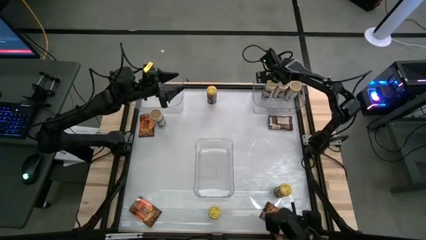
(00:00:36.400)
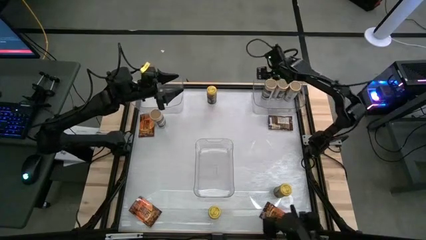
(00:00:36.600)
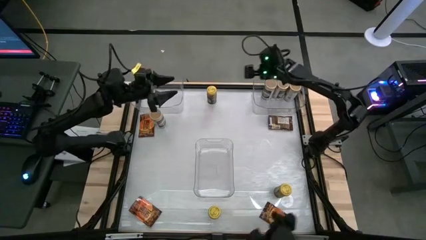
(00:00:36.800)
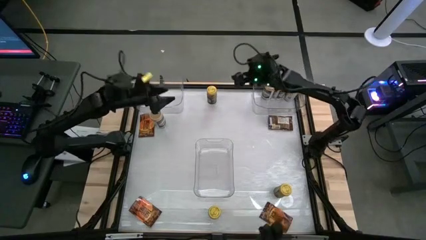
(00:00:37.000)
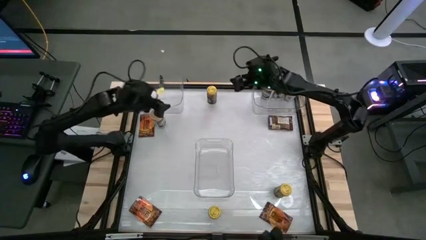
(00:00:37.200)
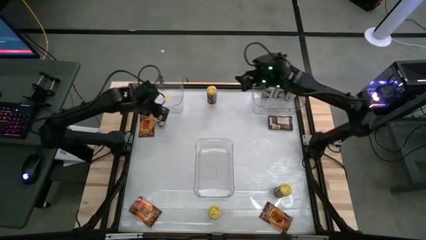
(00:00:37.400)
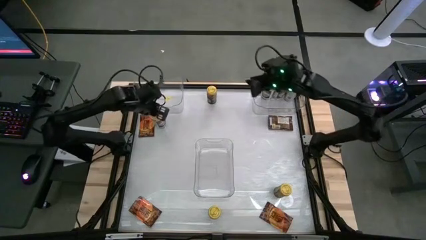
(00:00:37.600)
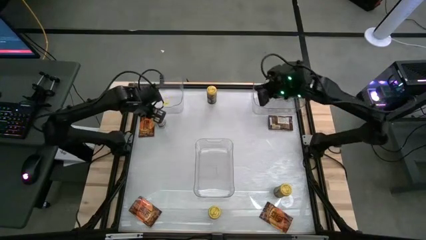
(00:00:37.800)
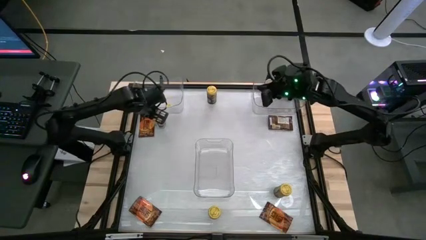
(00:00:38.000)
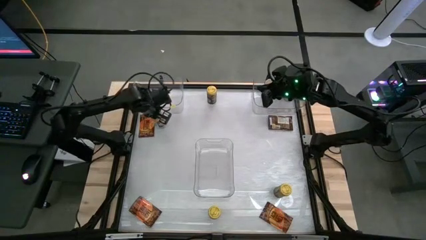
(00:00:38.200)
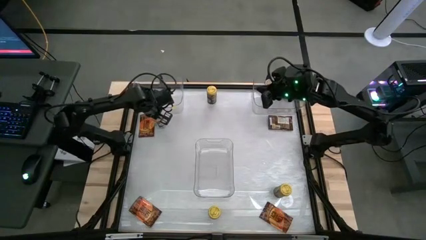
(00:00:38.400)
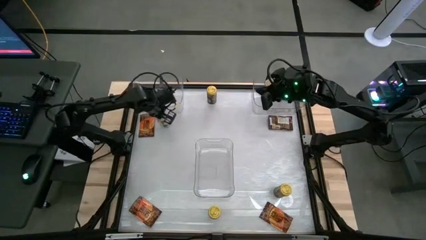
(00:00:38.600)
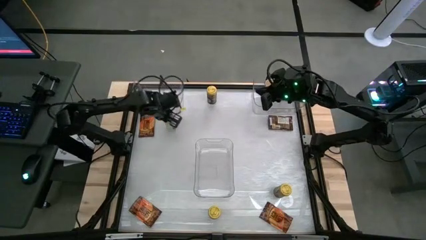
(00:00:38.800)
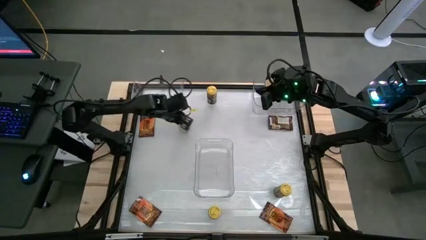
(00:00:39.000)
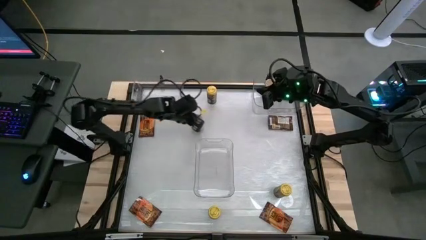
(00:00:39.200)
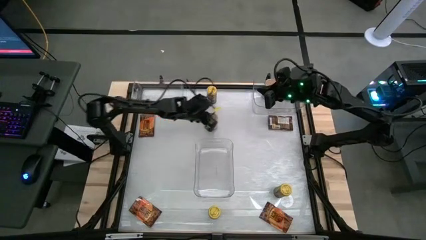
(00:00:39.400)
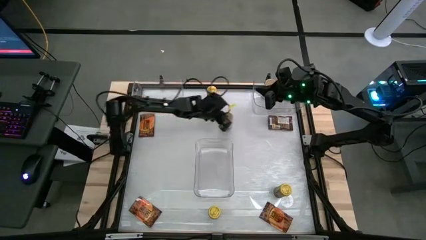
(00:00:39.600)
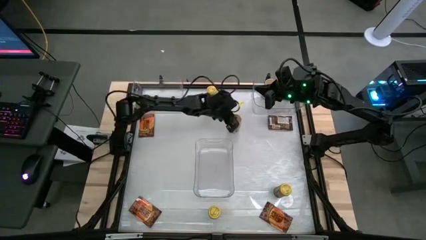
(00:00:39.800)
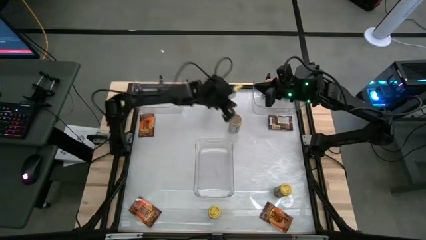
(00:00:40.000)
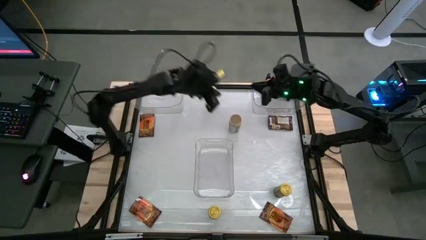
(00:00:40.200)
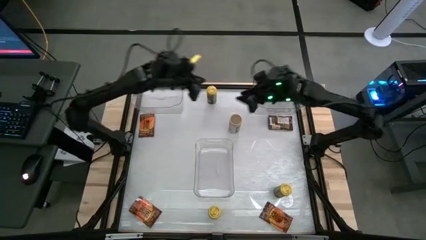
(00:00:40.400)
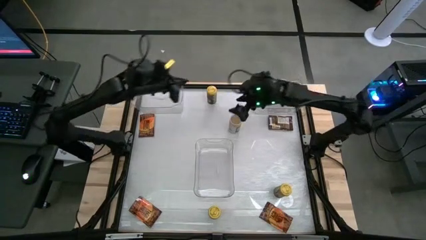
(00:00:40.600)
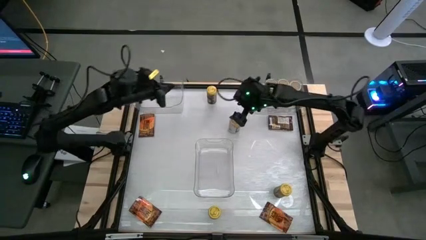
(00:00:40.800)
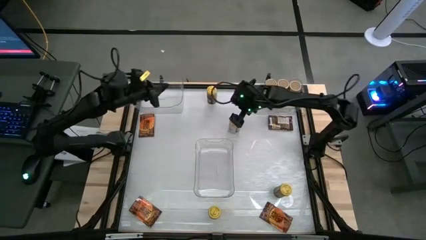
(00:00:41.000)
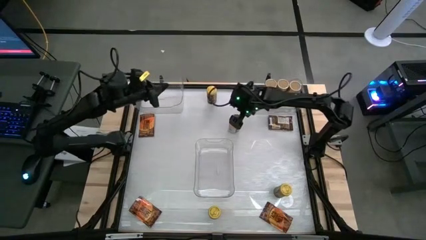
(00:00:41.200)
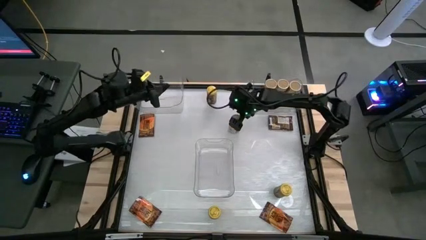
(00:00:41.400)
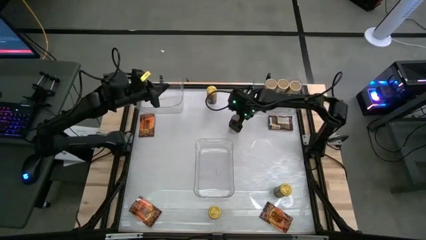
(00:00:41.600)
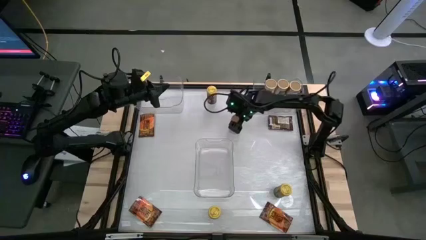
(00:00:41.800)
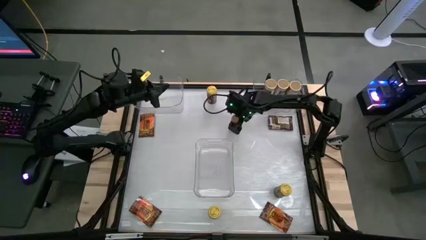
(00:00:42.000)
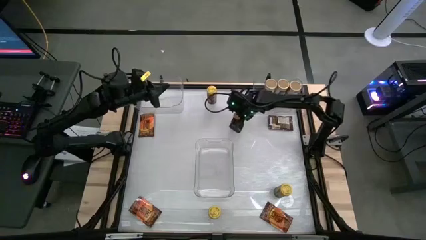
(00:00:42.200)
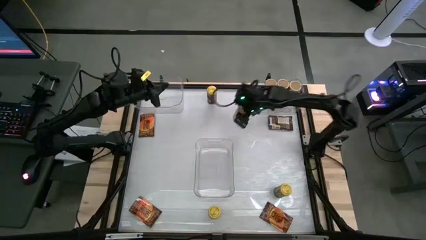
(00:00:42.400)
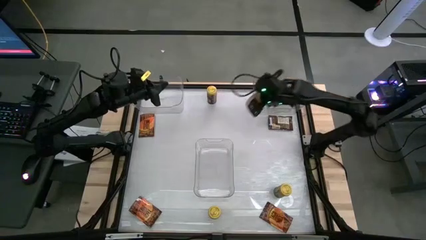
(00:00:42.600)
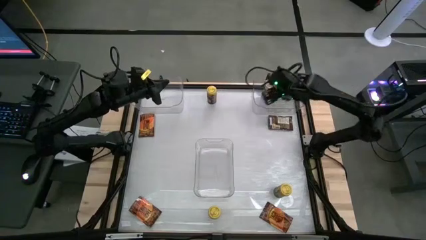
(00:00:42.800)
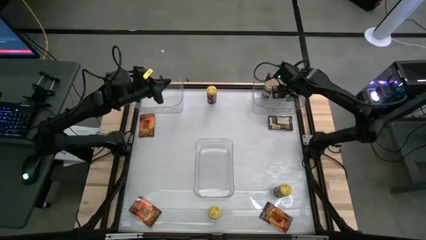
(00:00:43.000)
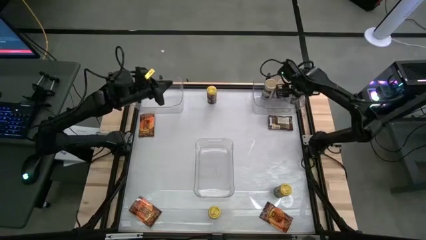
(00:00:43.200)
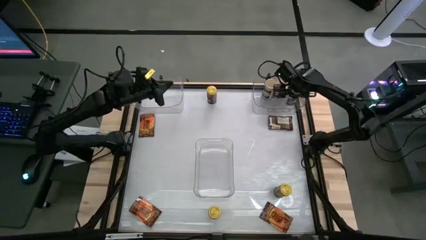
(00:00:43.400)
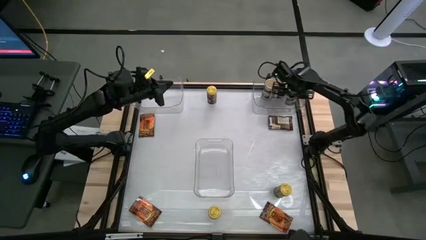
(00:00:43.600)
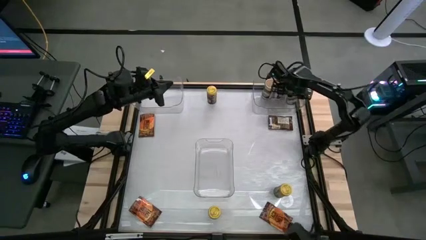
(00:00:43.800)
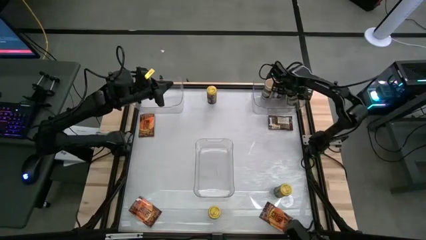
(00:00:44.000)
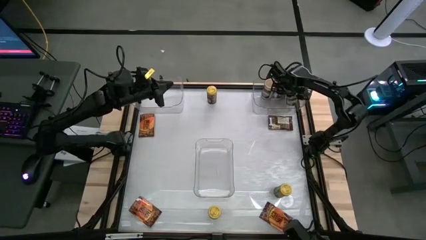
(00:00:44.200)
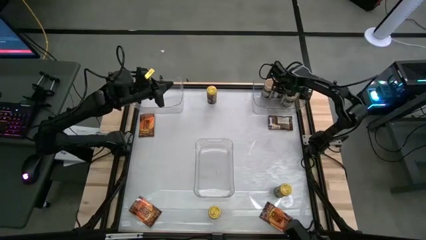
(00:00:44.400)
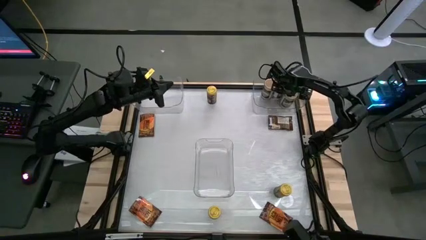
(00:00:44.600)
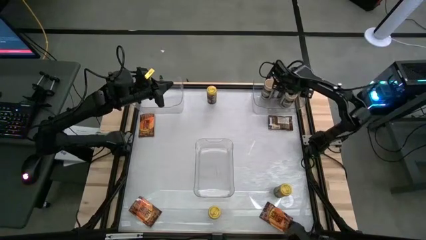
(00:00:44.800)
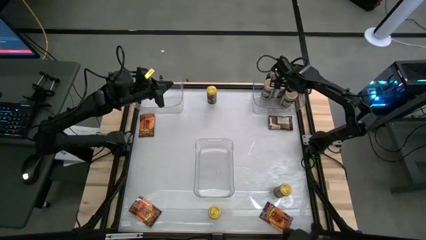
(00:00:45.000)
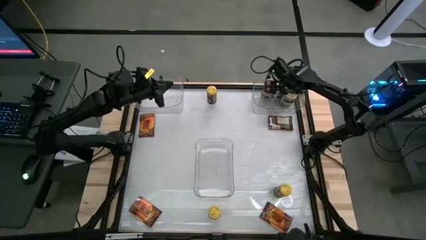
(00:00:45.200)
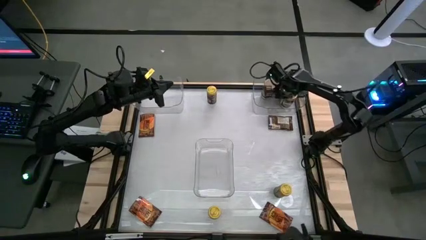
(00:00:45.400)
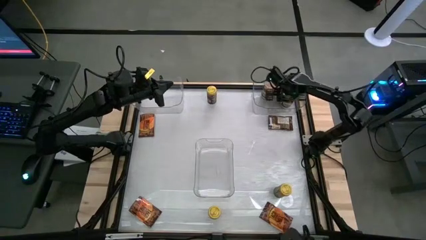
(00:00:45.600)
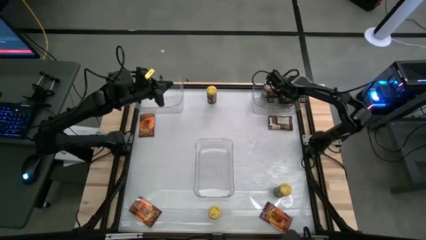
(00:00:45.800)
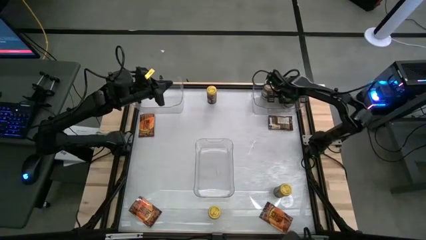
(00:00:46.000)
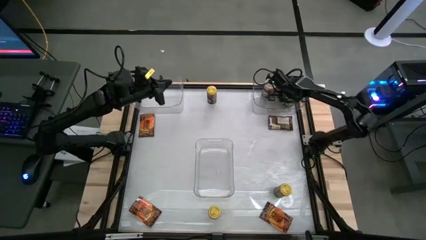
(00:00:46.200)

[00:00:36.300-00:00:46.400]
Task: Sort spices by type
Put the brown seasoning bottle into the transparent bin in front of the other brown seasoning bottles

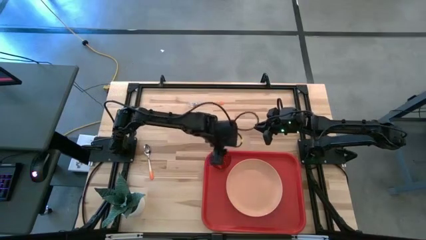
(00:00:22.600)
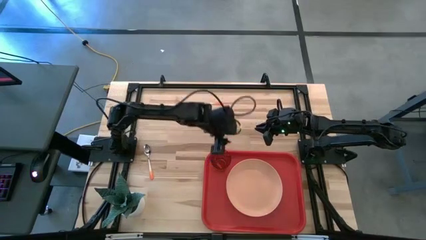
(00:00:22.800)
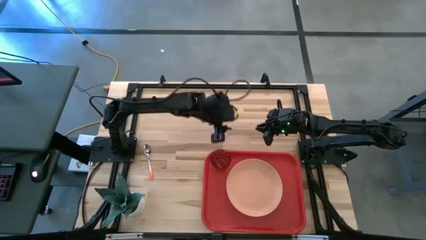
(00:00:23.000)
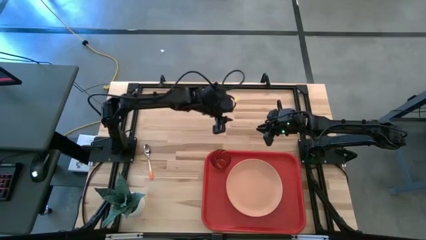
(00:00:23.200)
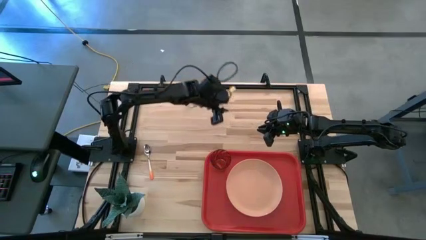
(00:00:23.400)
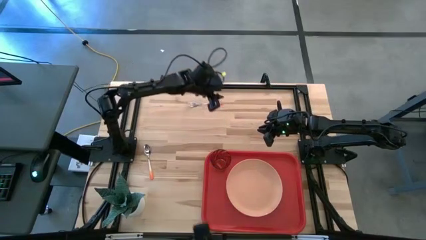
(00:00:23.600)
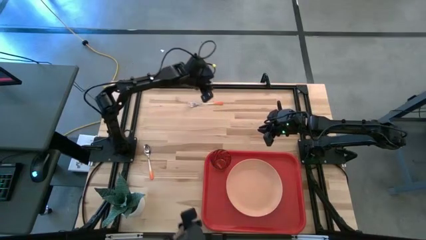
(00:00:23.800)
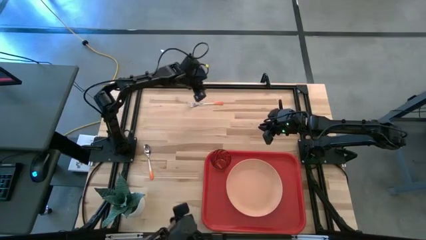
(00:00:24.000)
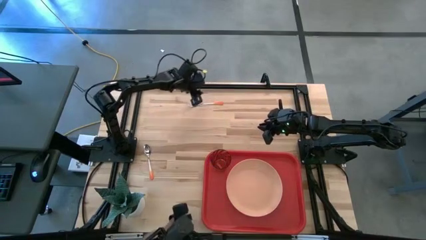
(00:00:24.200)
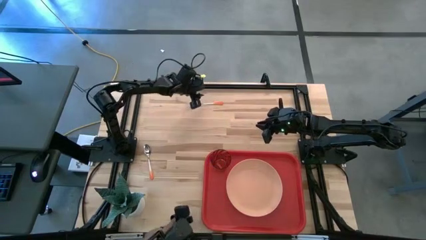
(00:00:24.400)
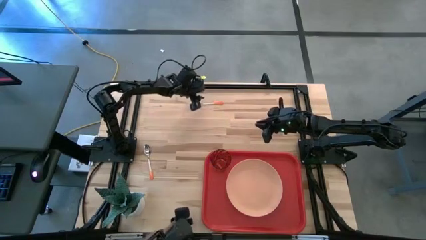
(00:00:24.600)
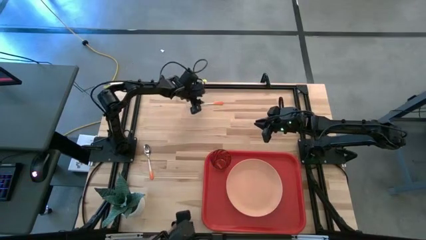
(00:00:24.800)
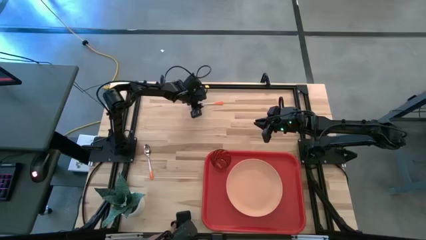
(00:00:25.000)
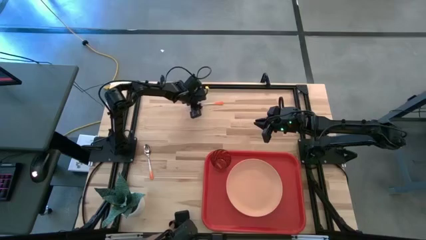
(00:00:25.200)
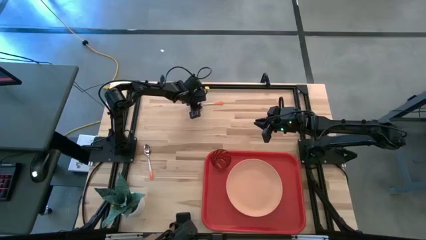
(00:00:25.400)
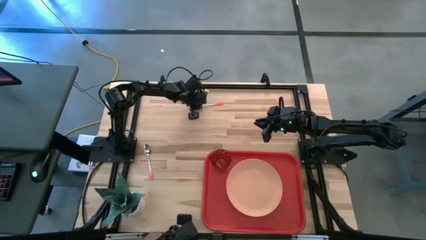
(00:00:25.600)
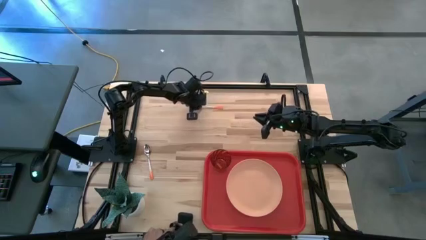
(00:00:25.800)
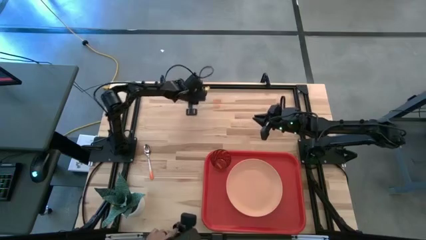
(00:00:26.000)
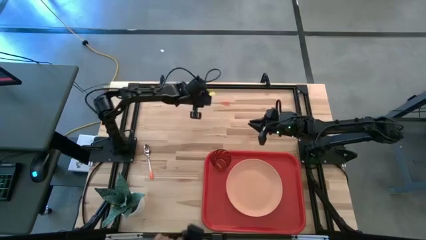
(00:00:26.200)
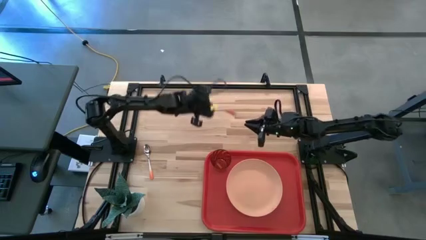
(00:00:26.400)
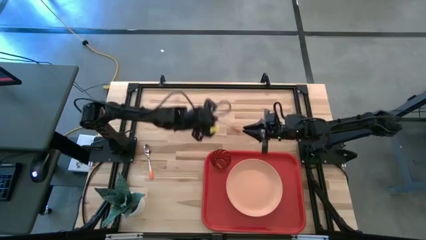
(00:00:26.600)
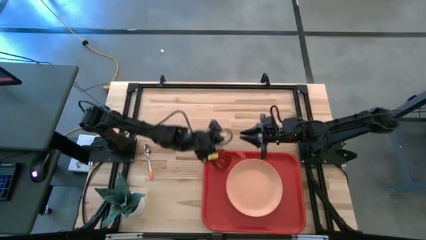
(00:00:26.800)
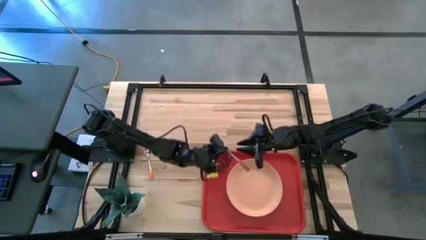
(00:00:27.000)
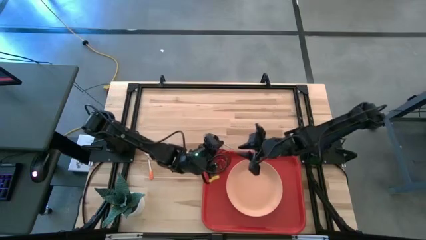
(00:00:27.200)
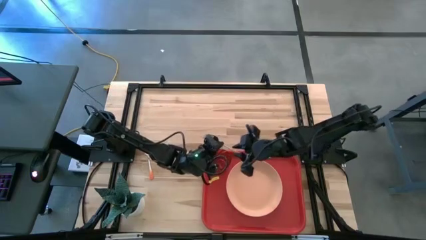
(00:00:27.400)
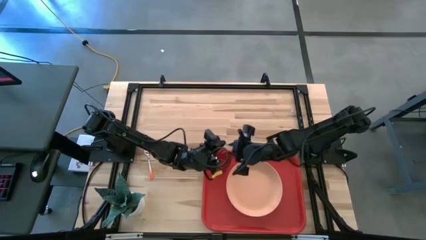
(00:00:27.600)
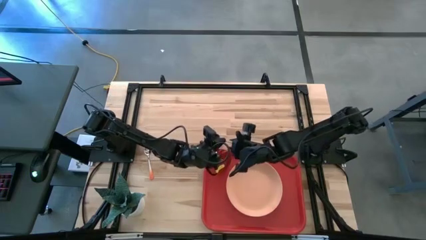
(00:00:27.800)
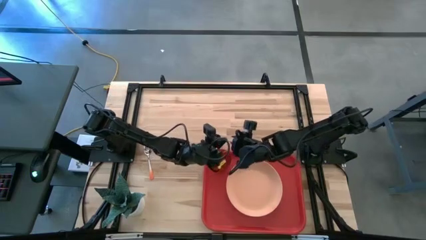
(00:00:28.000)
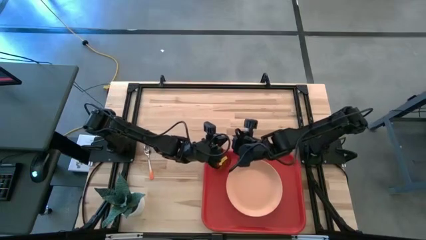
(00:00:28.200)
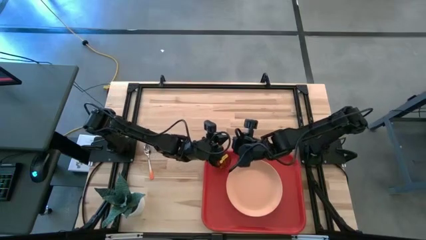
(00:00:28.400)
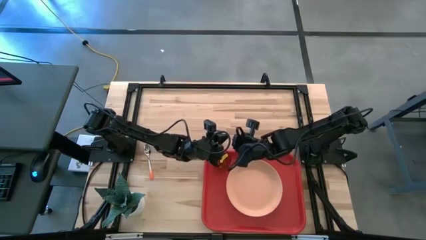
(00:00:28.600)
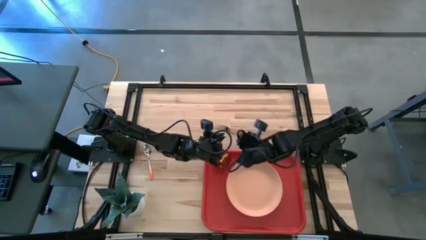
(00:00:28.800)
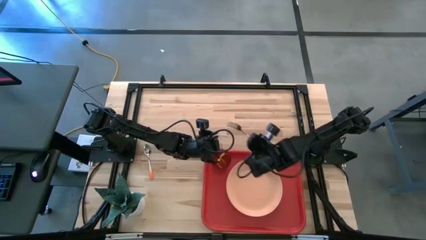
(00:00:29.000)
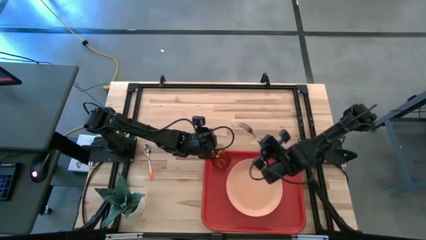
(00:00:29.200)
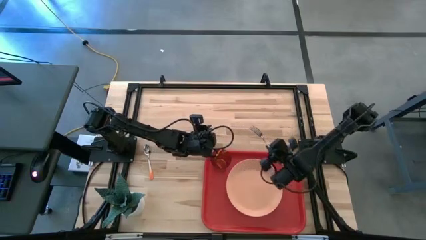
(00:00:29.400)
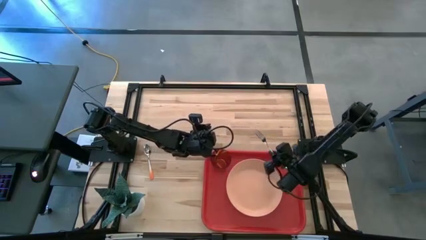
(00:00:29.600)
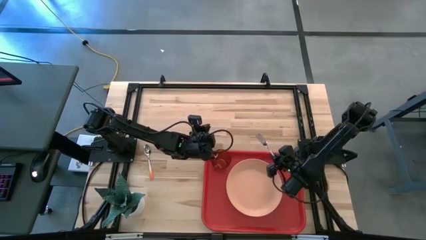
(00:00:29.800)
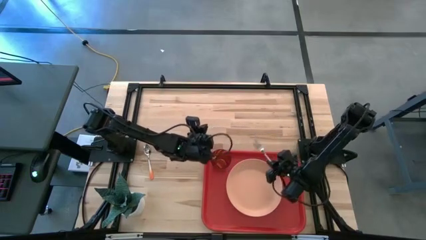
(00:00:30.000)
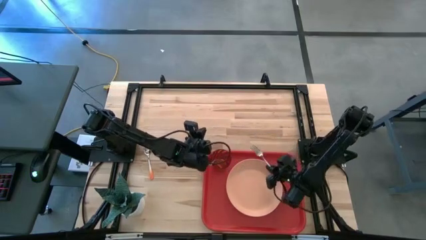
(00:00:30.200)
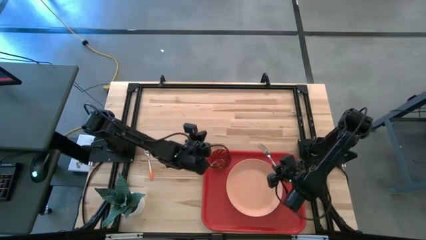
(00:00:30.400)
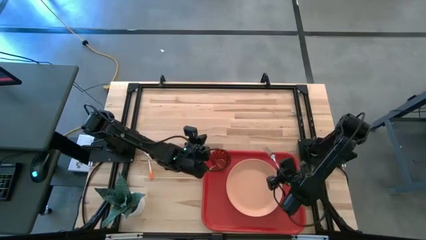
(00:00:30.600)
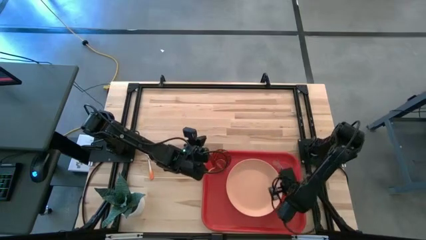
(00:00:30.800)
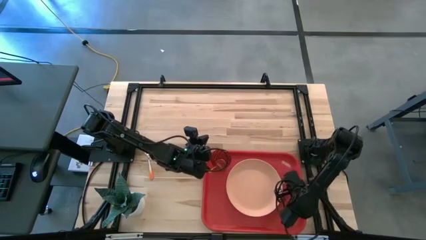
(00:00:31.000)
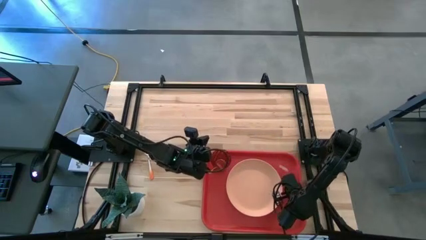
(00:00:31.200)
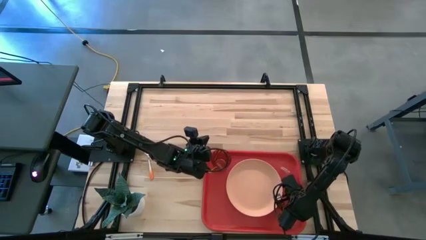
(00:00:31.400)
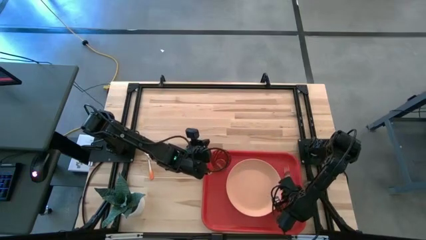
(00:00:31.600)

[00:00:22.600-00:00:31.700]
Task: Pick and place plate/cup/fork/spoon on tray
Put the orange fork on the orange serving tray to the right of the light orange plate
